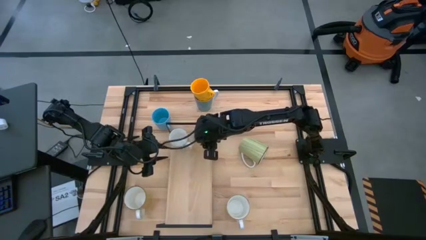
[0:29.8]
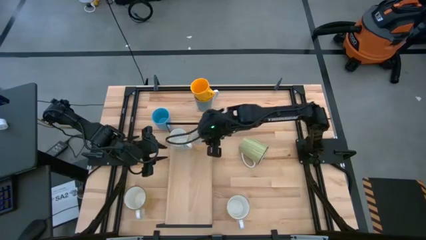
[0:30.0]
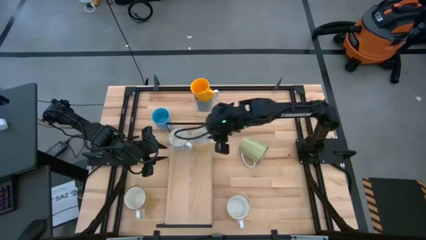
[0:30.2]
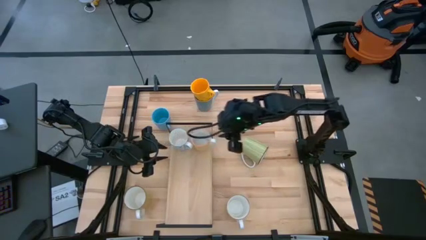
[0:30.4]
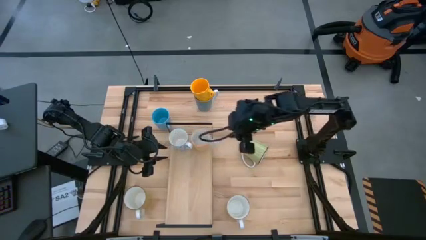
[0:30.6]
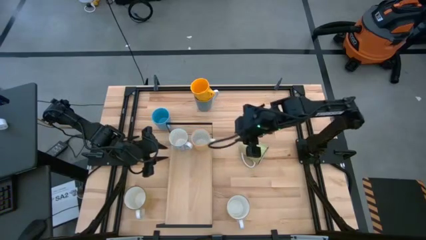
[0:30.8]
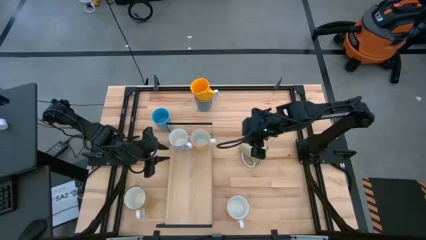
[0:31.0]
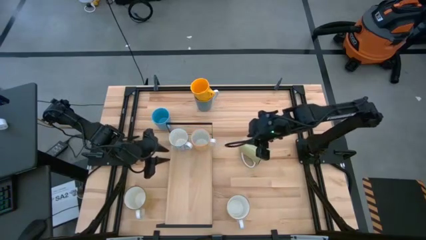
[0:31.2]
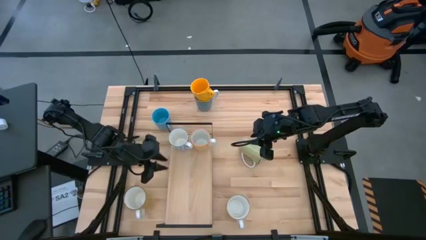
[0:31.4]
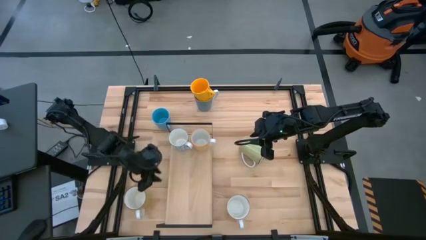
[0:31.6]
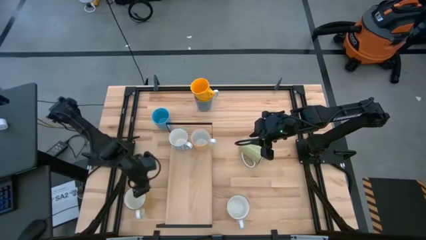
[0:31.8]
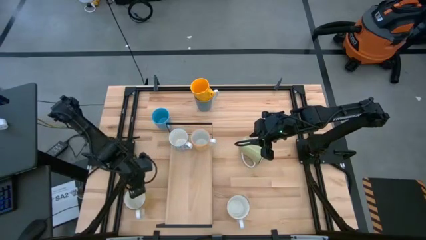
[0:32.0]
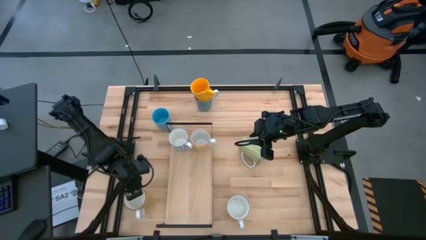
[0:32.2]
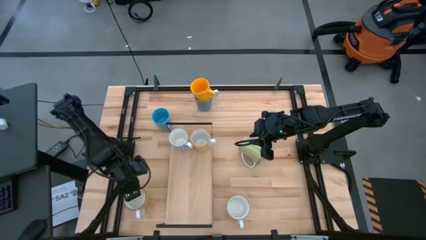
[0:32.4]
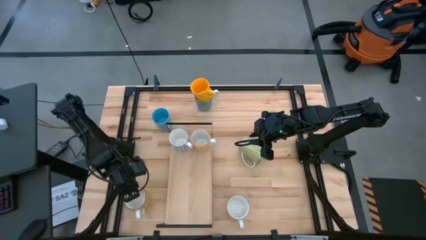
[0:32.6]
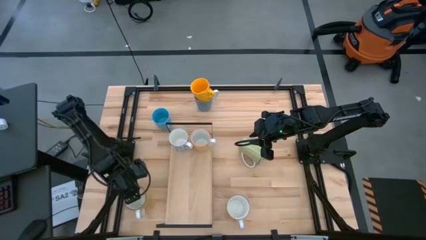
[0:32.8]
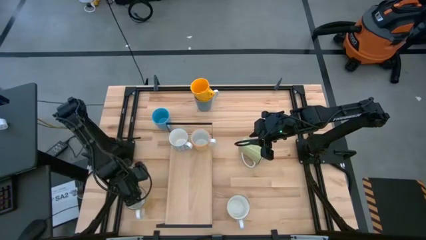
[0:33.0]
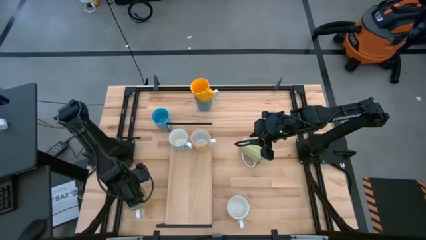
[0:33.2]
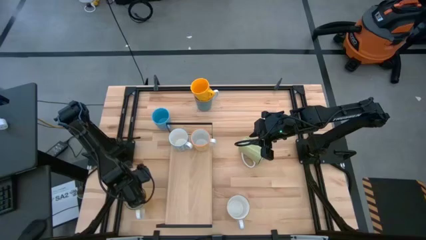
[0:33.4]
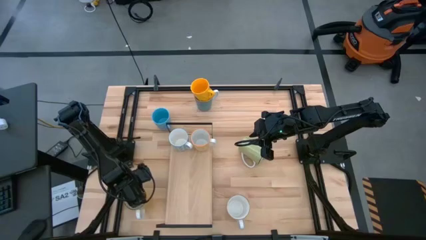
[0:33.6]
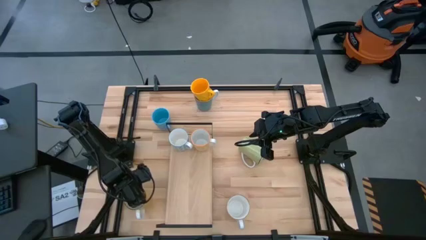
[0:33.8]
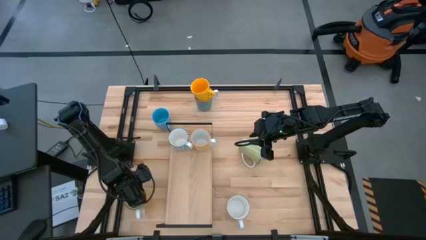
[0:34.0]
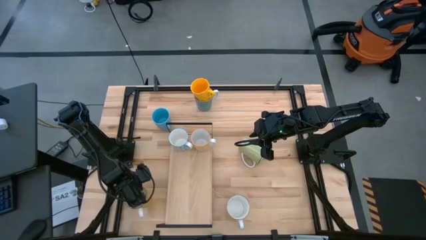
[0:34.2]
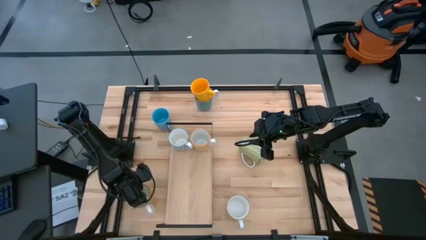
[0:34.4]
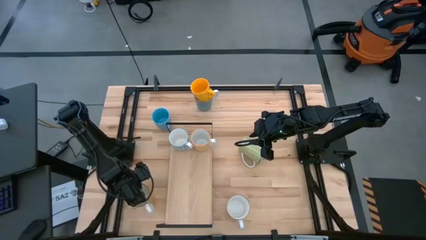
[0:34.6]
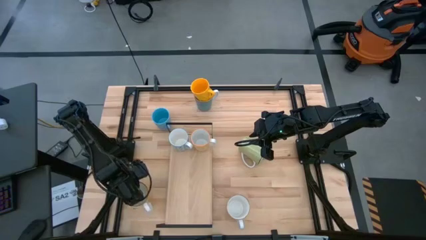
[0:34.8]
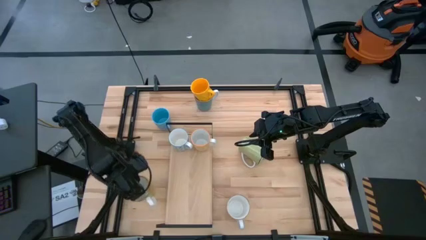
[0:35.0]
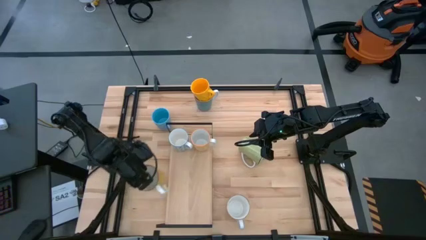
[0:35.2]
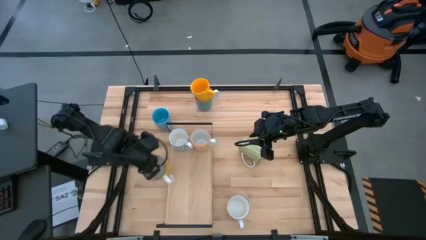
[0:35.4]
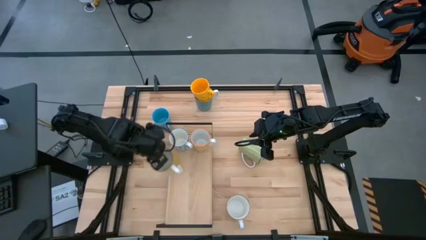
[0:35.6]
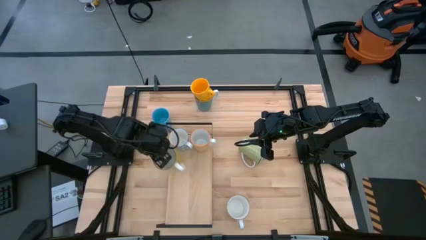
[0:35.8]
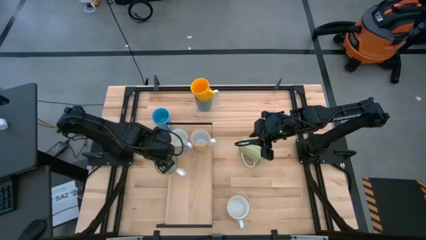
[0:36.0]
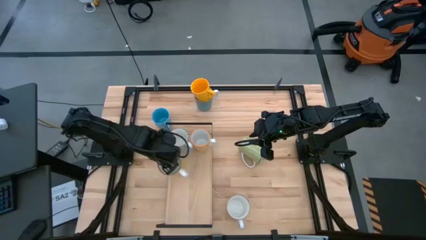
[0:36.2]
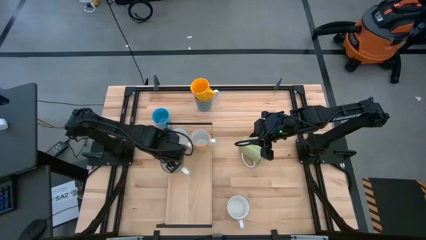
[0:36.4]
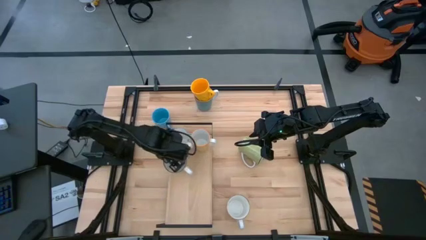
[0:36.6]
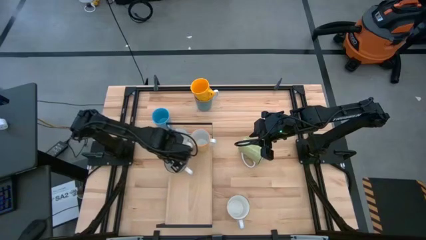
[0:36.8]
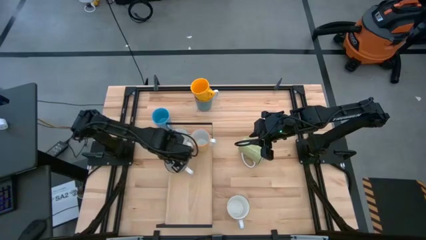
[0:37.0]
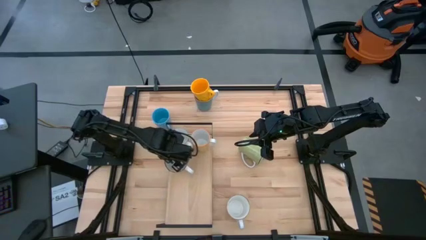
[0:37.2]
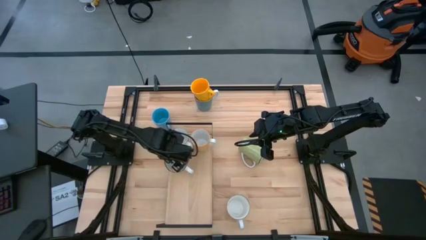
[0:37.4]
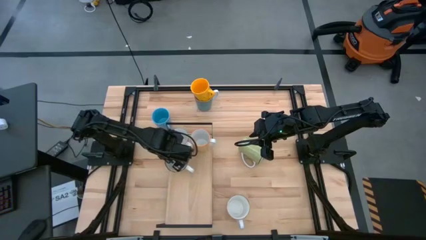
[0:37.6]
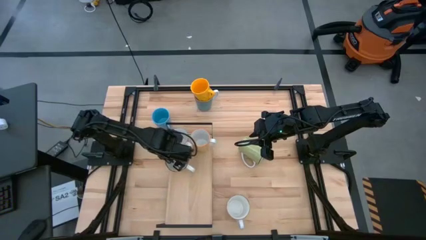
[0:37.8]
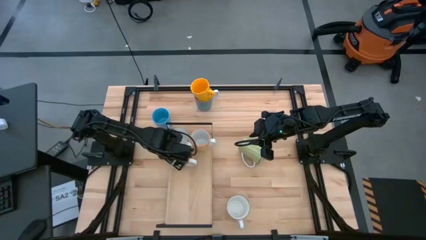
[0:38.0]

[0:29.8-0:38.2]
Task: Place coffee mugs
Put the light yellow mug on the shelf

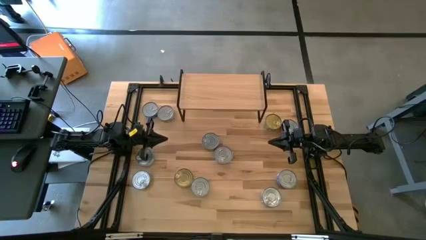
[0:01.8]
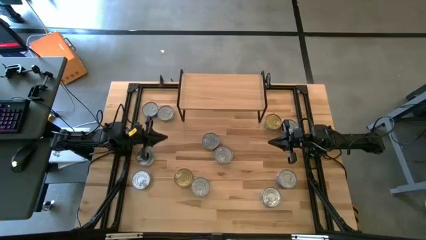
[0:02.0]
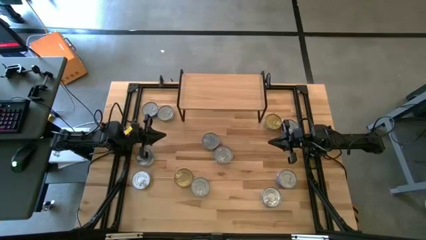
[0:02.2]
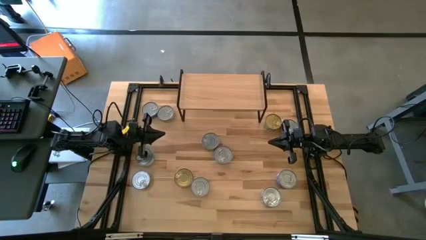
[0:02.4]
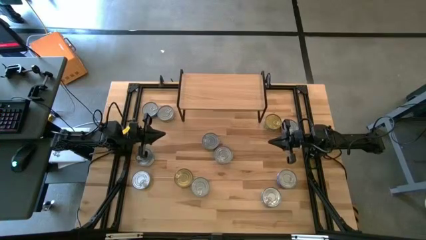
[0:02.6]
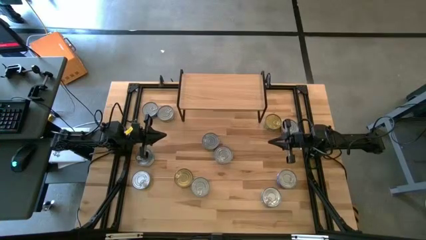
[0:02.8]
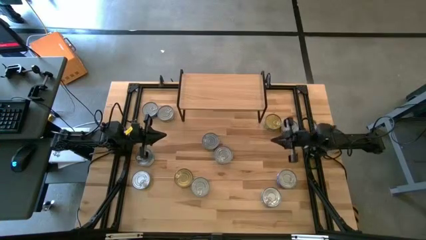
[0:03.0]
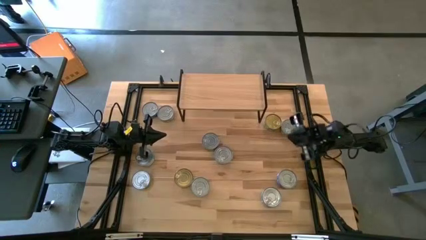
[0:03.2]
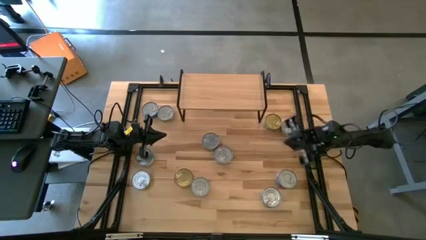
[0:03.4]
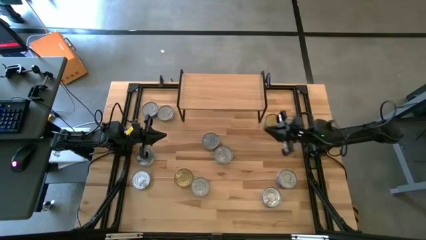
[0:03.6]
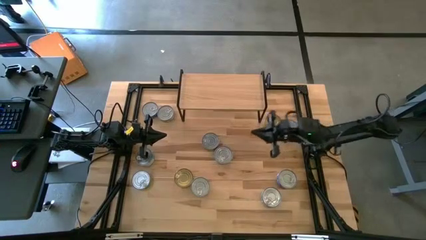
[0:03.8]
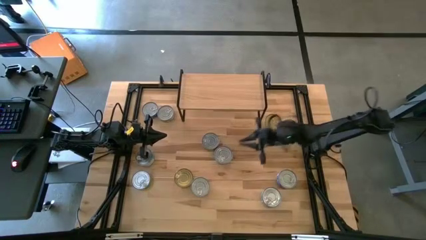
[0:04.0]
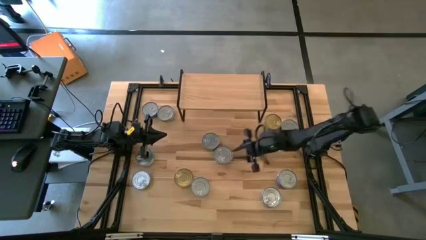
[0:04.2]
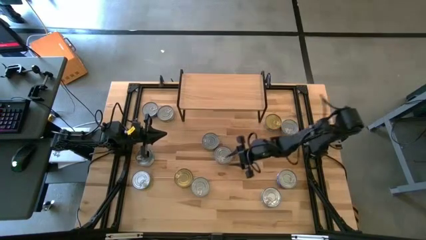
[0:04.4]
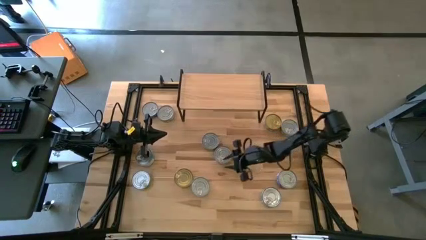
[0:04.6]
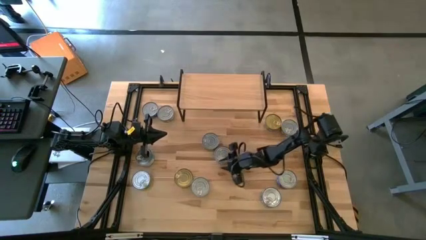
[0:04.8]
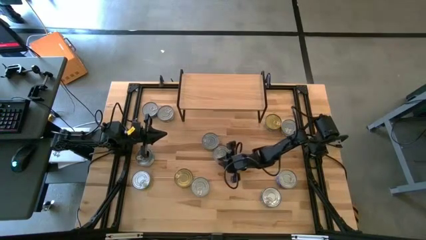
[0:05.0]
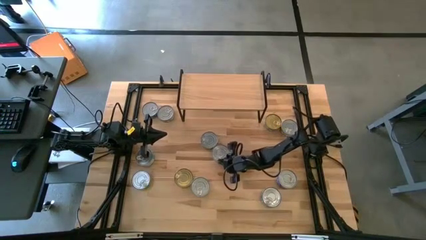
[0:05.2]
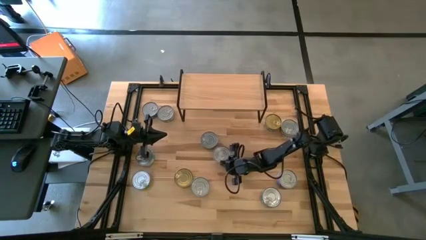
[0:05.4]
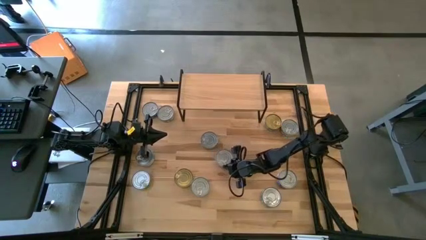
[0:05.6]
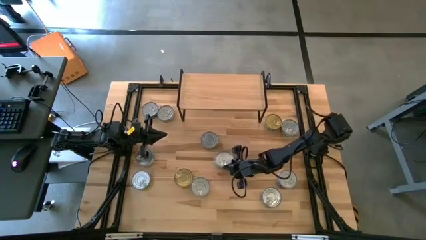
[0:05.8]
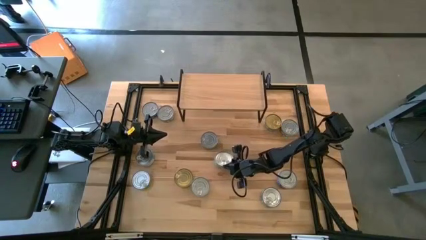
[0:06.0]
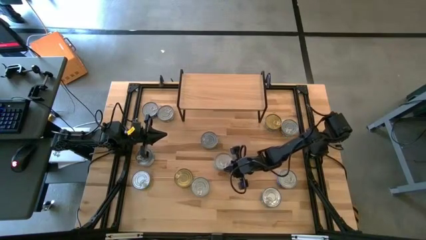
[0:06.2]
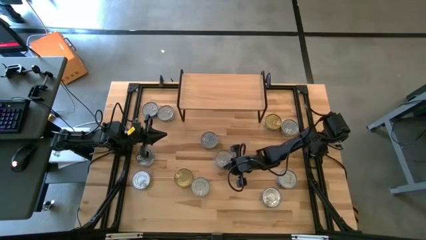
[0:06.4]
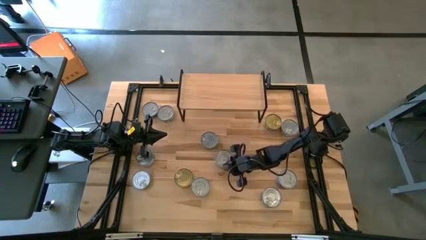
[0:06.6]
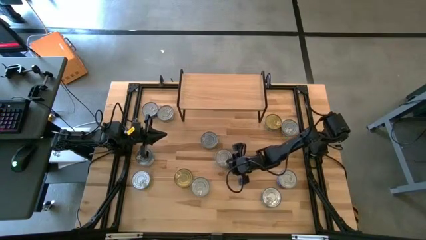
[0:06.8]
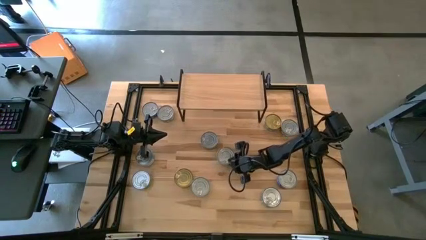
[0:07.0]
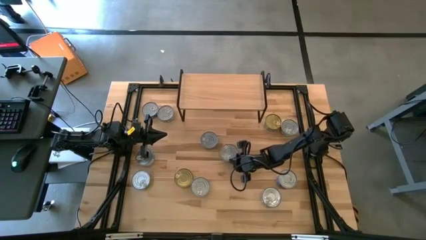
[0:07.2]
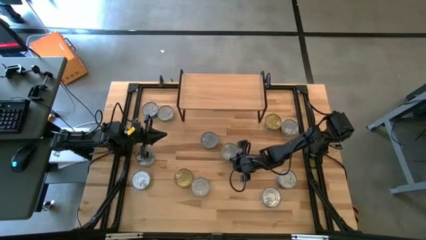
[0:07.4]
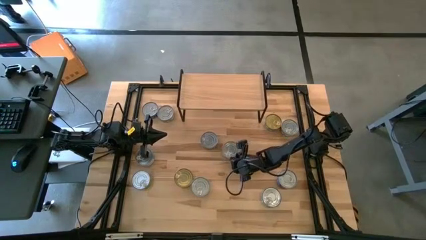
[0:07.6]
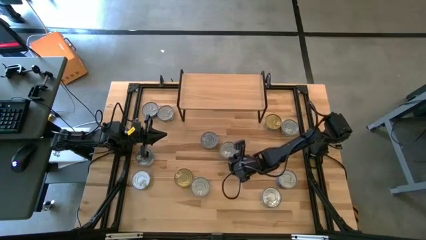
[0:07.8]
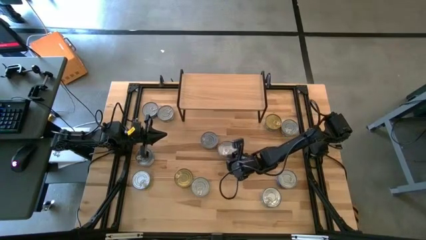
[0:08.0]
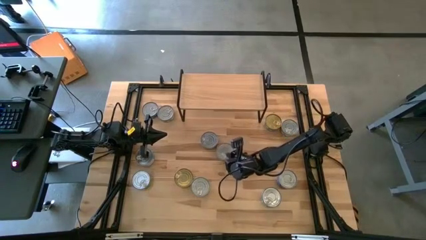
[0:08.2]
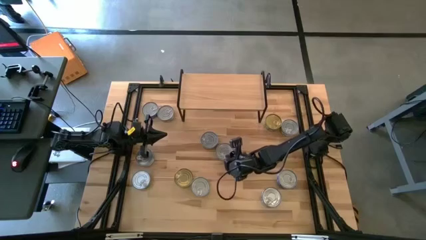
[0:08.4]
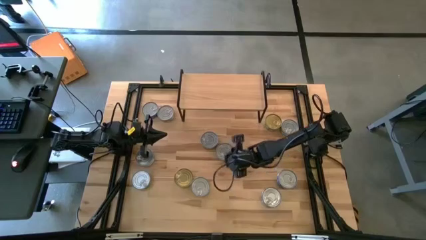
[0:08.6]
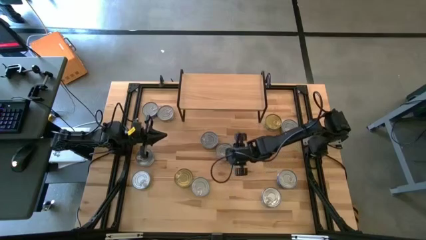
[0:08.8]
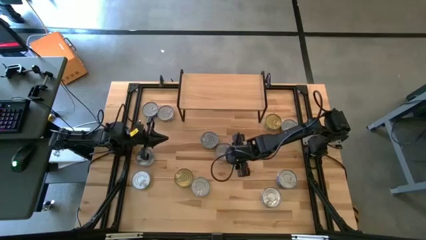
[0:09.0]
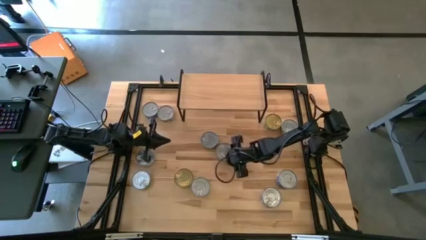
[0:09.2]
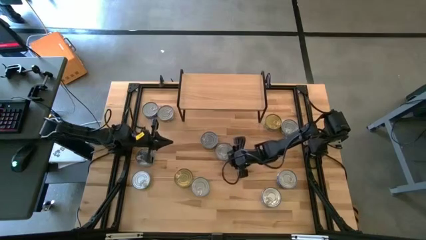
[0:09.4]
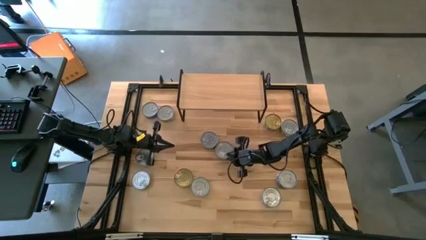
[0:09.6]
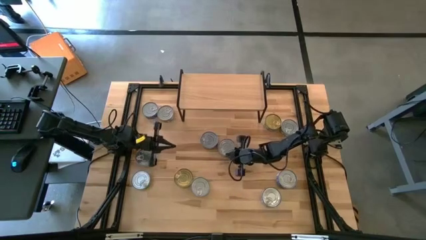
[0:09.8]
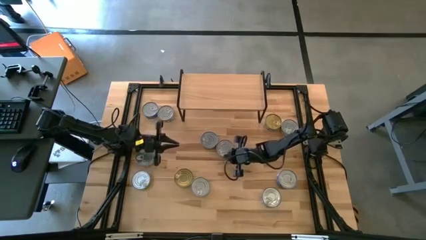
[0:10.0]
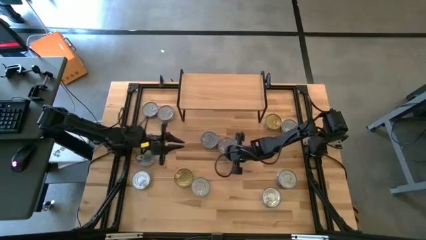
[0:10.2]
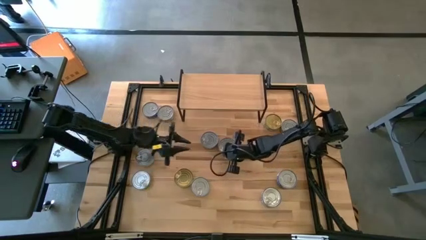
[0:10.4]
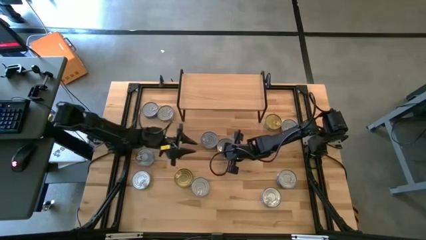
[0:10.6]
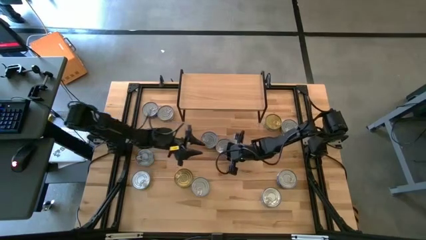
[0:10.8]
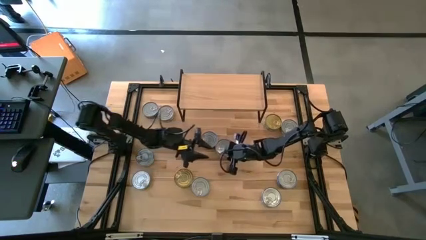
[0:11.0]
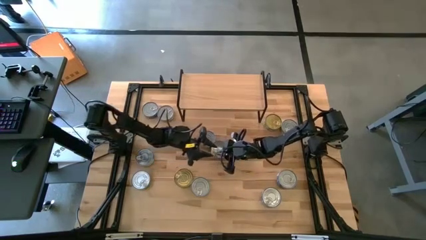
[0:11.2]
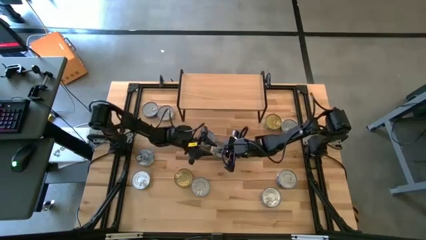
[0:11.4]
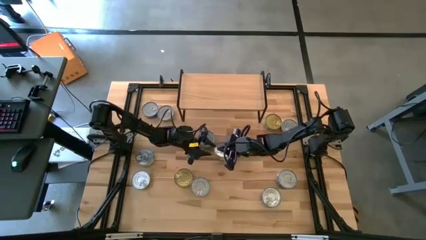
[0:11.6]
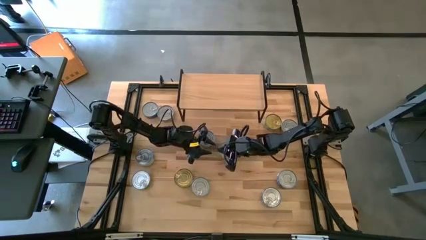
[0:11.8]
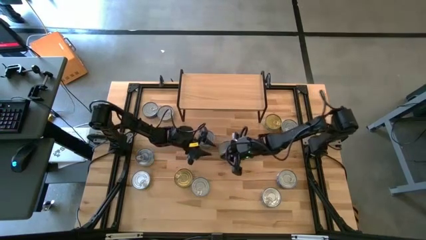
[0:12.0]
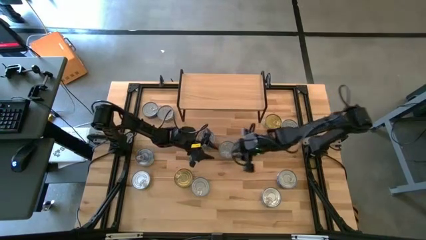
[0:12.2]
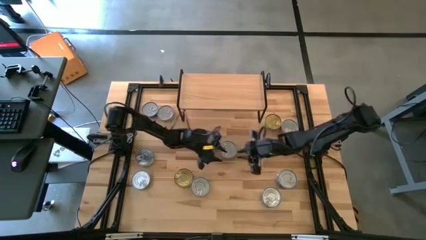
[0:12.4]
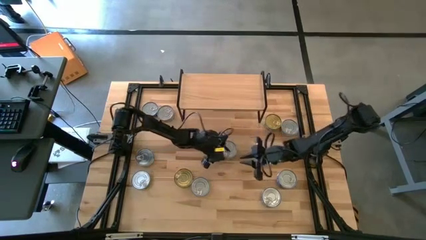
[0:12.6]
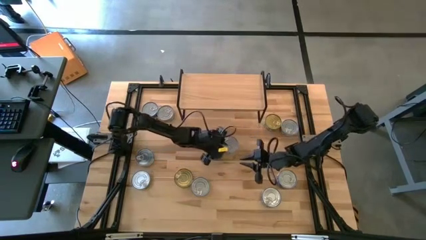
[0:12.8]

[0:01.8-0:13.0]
Task: Stack canned seafood by type on shelf
Put the yellow tuna can on the shelf
